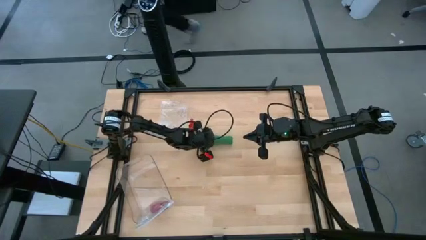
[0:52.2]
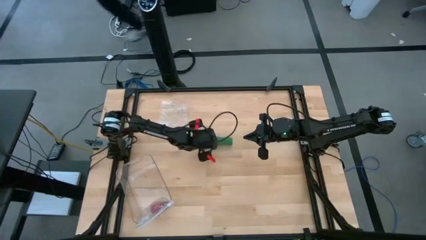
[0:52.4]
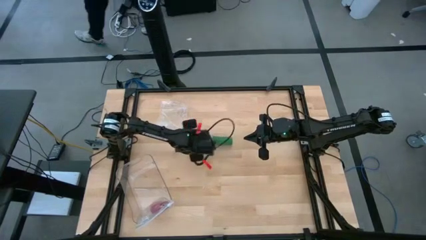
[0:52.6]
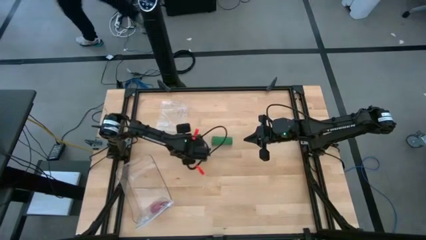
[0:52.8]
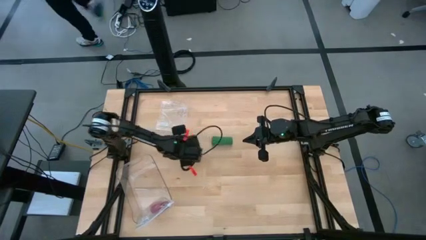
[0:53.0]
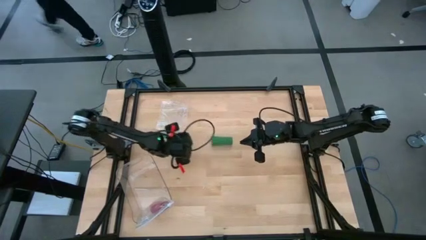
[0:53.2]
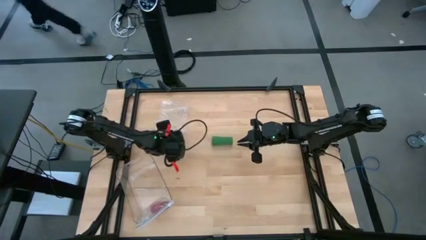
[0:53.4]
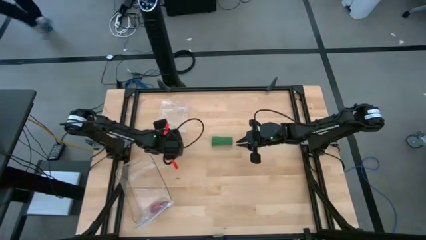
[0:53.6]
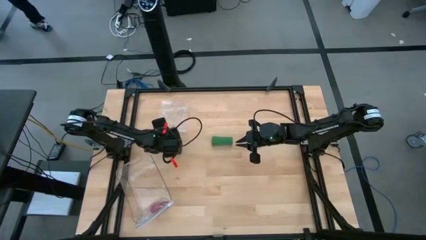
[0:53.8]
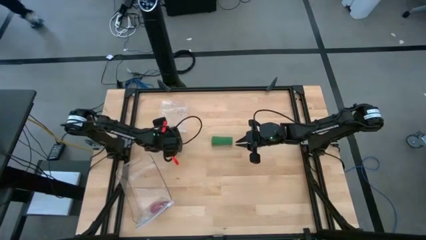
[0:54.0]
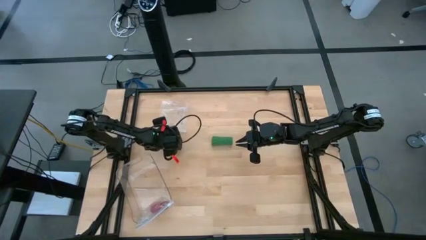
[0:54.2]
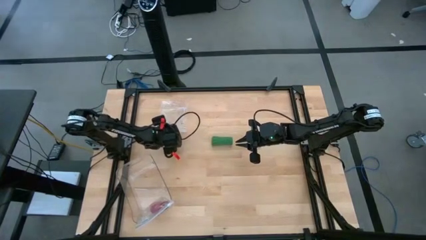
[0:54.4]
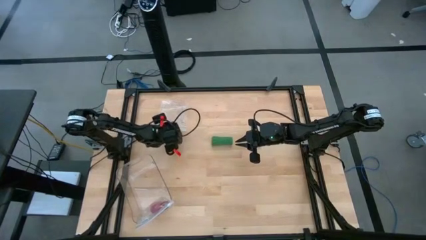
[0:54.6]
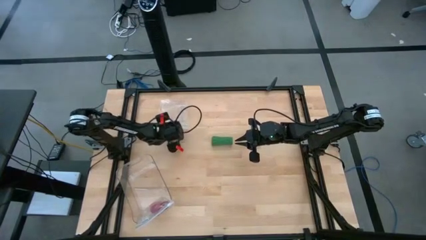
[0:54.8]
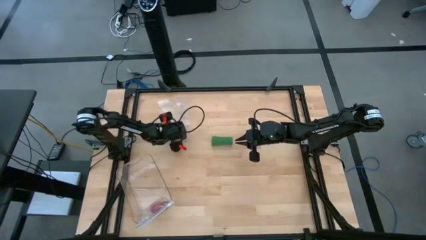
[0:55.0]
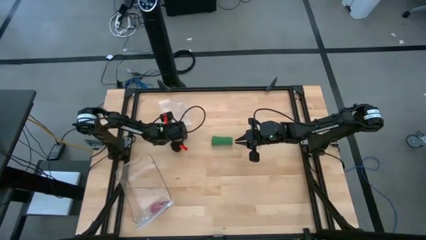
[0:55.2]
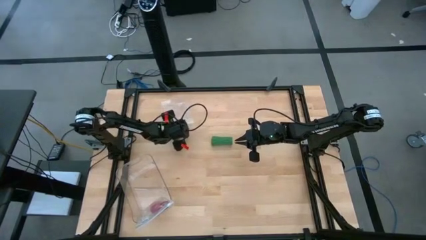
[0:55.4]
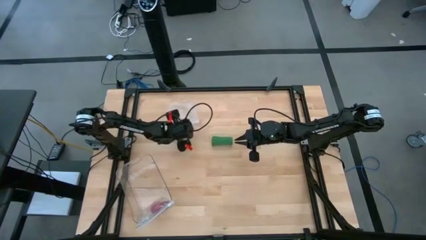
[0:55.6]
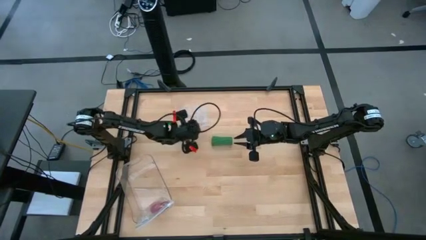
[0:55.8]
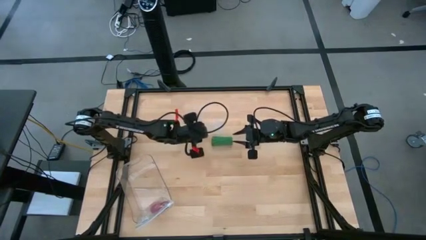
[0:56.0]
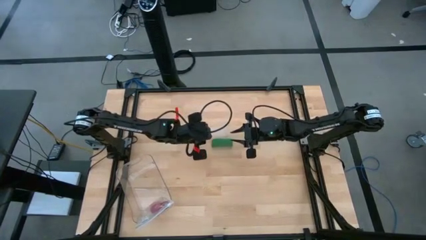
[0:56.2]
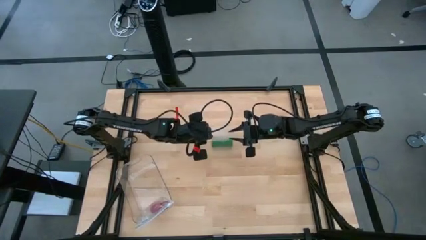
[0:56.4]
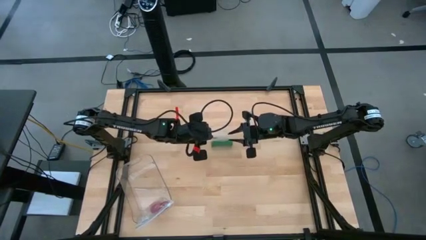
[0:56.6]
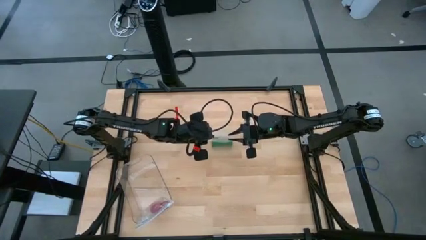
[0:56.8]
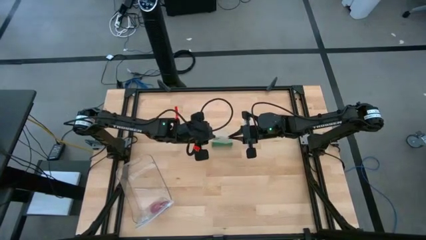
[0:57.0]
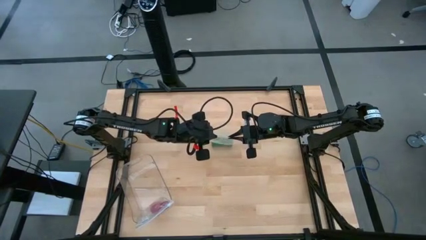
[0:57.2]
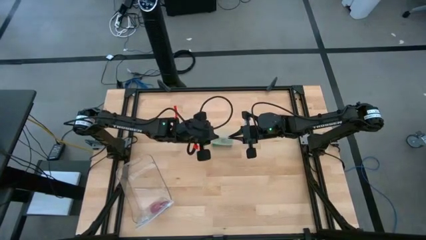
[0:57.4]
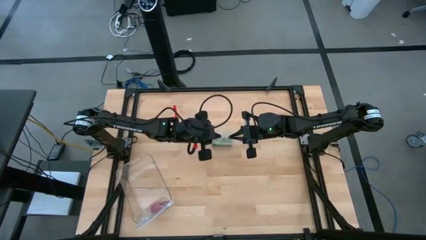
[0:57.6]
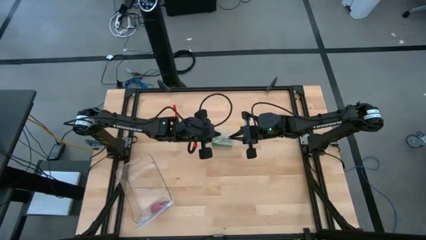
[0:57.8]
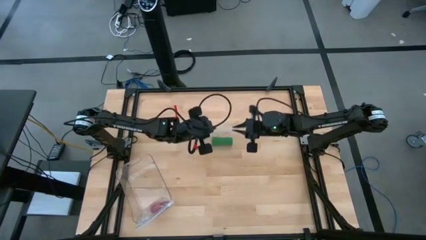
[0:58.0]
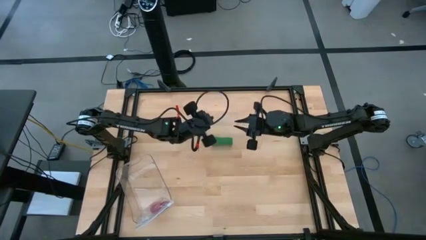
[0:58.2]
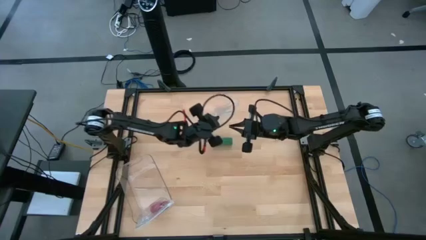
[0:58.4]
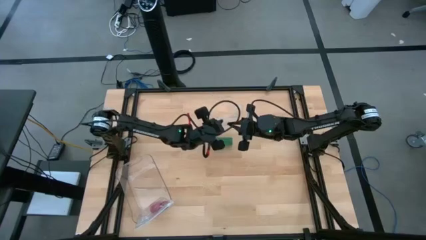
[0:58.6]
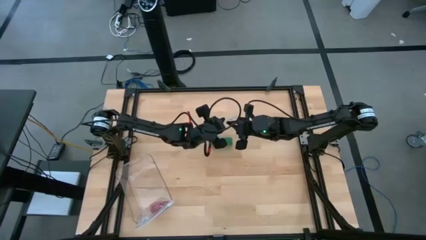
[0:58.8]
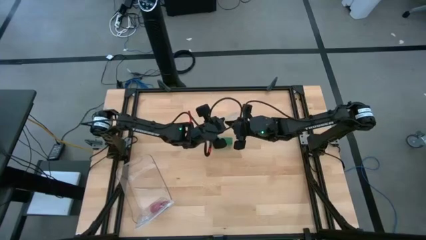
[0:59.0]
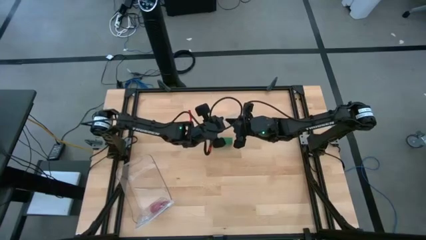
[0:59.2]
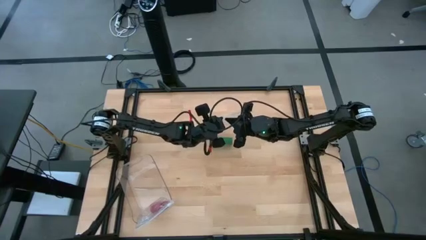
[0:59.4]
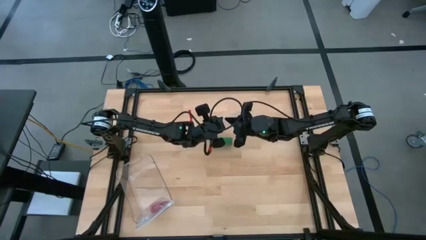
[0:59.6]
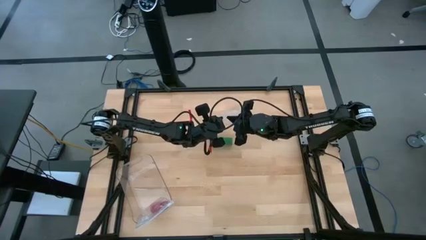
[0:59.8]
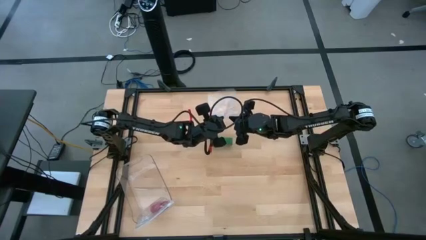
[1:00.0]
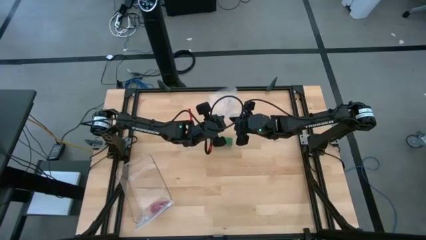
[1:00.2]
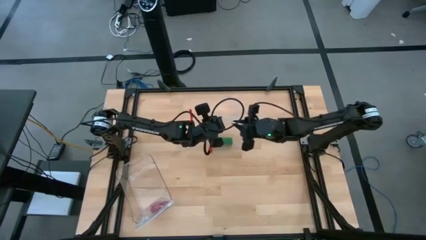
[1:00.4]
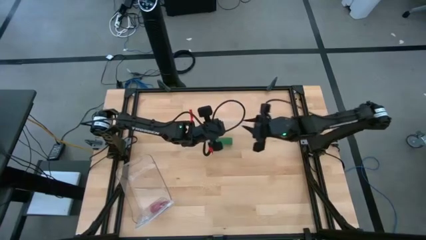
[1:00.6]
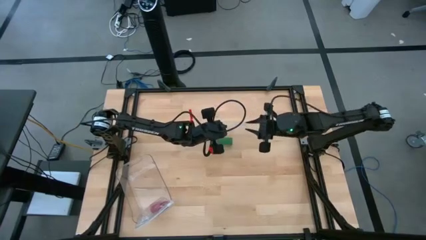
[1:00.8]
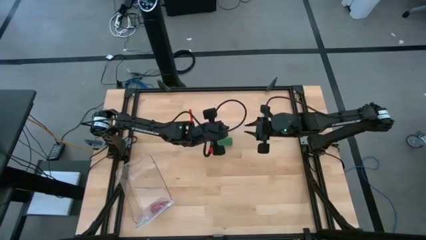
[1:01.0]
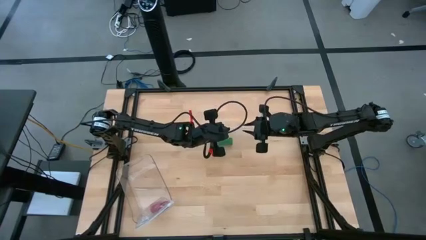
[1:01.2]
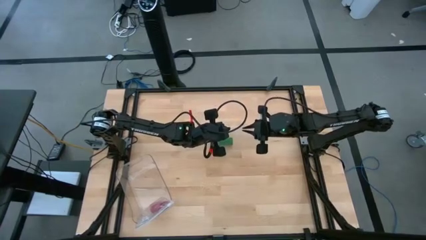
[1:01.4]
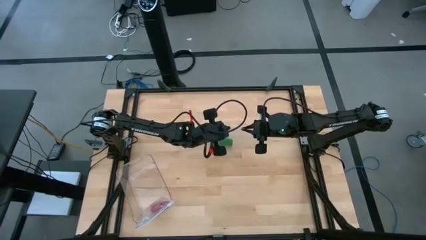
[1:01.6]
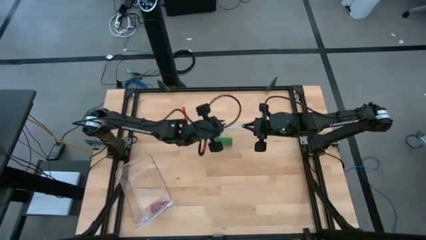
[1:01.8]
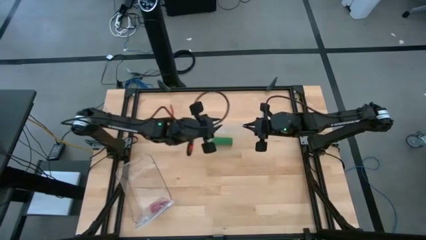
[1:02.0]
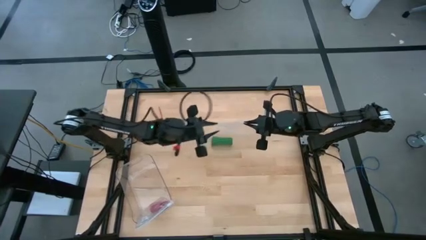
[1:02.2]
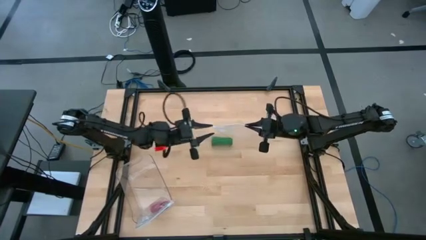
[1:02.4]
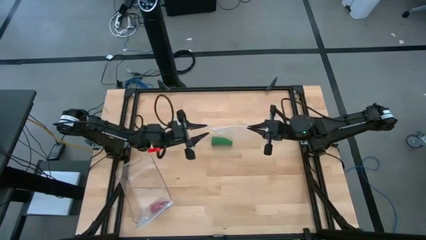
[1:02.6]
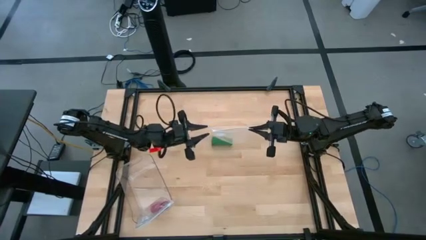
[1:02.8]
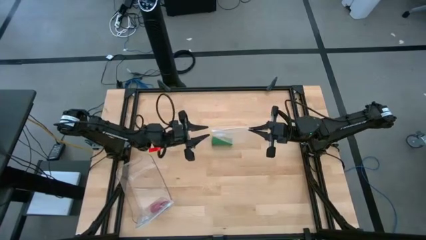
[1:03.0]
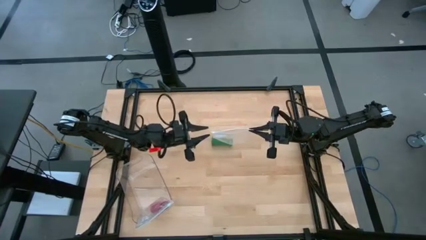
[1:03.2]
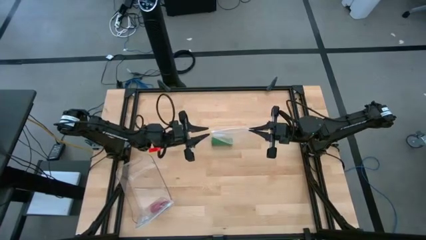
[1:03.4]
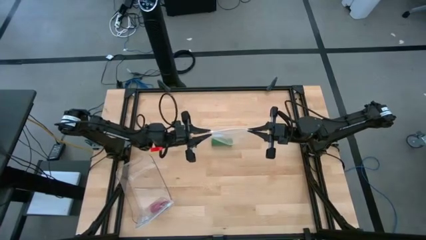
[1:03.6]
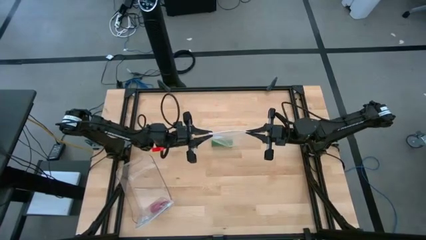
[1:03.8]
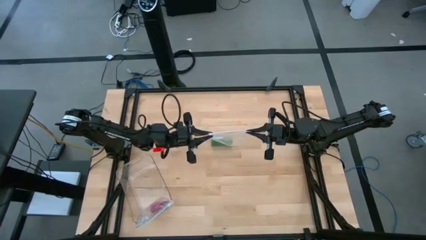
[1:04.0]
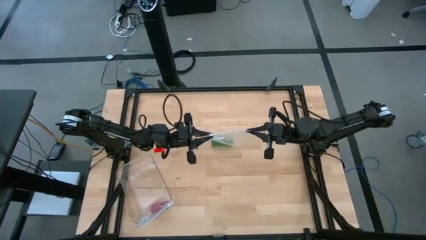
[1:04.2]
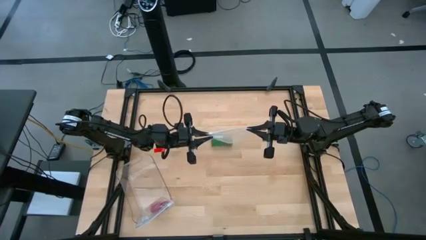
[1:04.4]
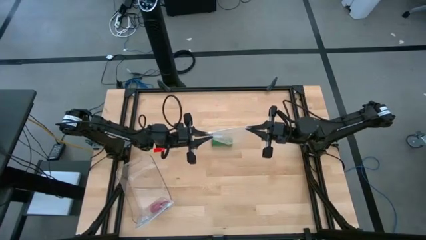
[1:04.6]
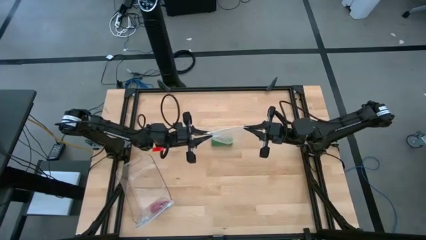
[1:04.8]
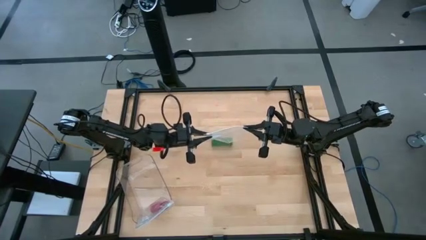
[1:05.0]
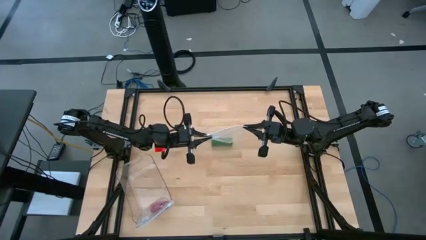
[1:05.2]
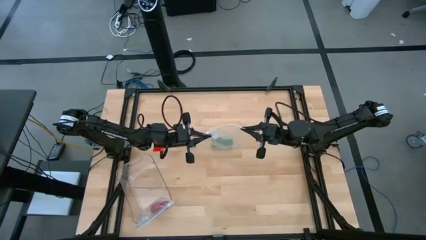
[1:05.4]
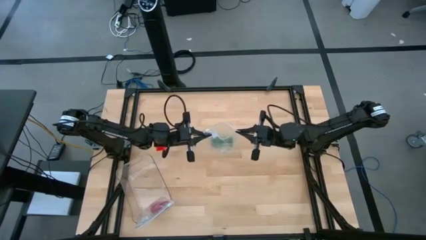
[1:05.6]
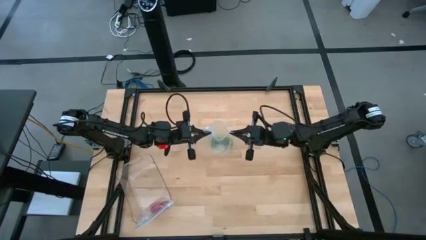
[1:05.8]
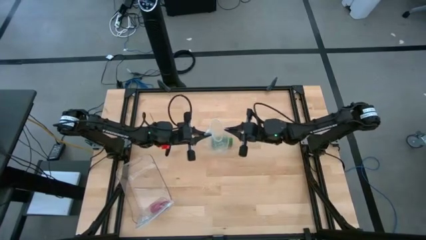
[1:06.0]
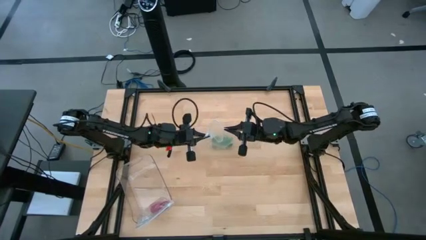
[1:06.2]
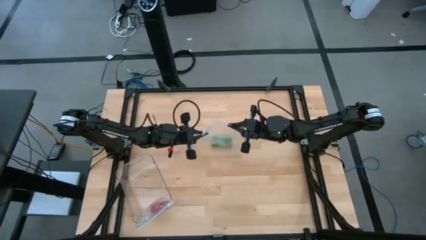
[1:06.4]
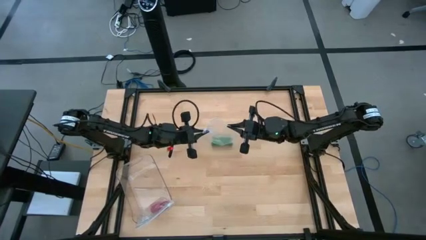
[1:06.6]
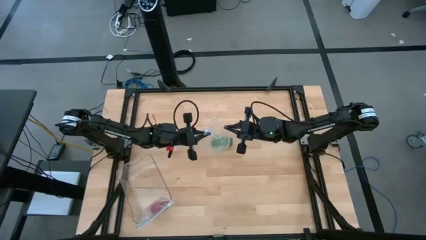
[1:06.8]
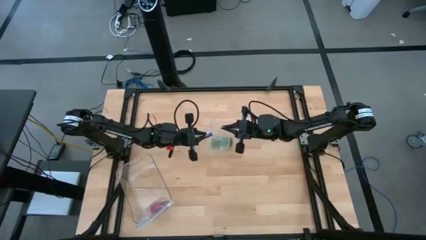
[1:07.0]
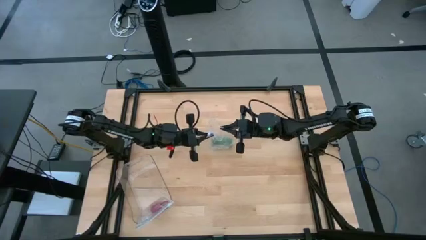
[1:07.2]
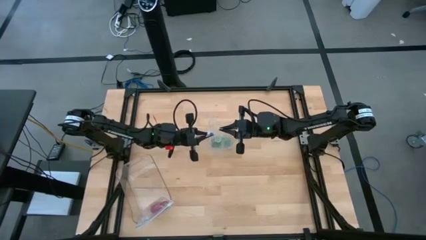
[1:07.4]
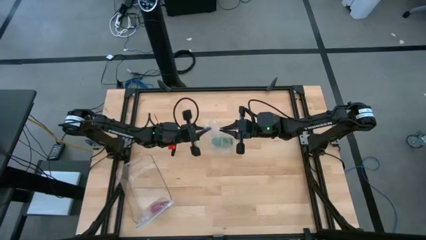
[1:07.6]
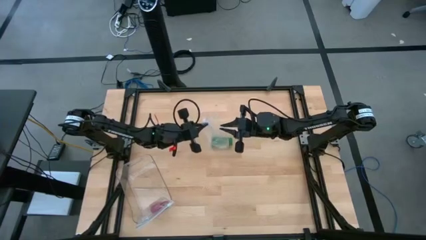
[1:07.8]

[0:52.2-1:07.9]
Task: Roll bandage
Prepare the transparent zip bag
